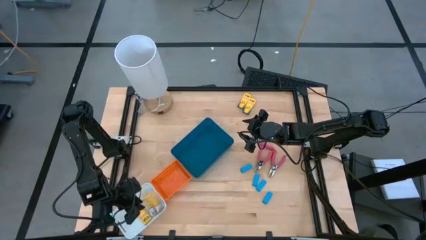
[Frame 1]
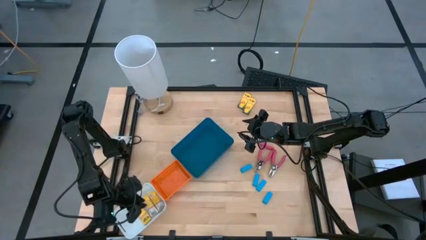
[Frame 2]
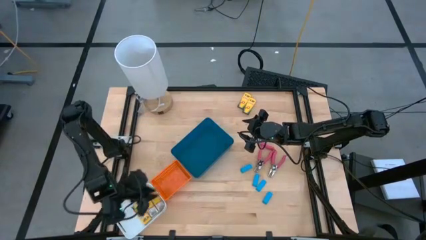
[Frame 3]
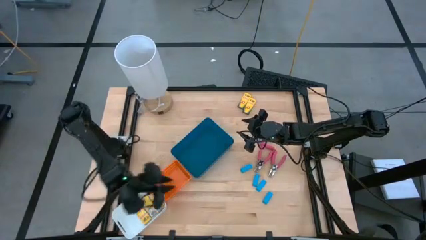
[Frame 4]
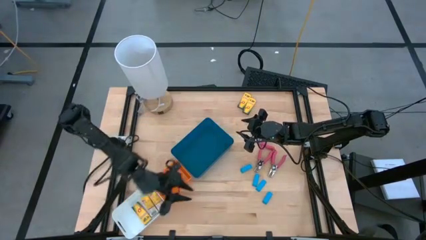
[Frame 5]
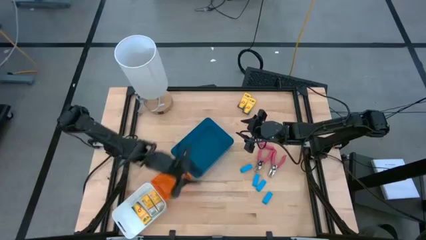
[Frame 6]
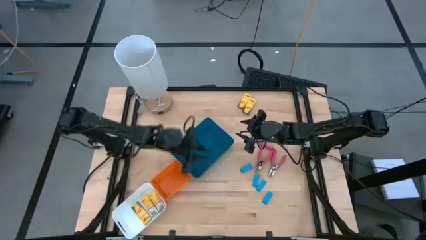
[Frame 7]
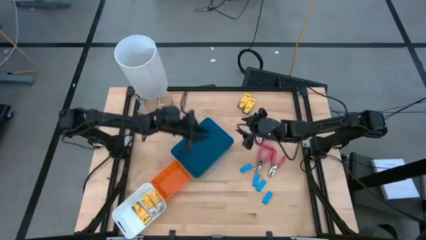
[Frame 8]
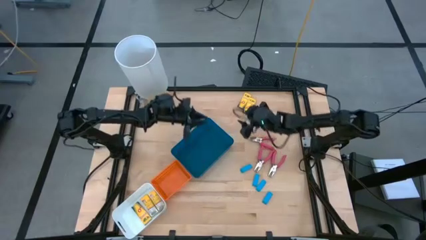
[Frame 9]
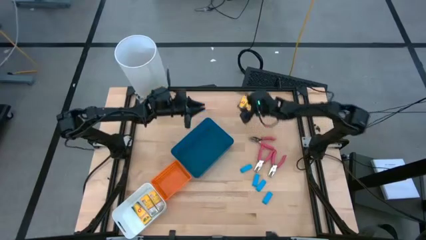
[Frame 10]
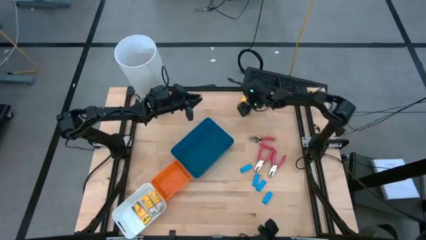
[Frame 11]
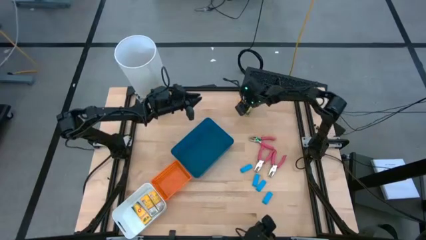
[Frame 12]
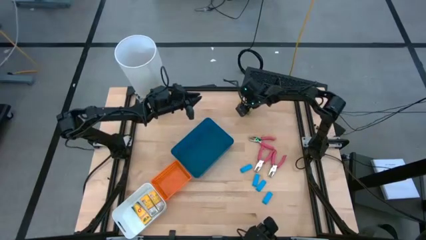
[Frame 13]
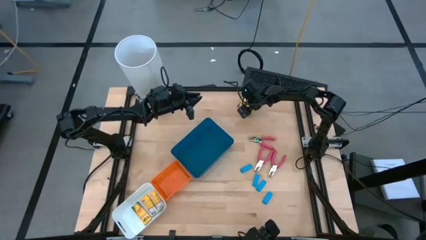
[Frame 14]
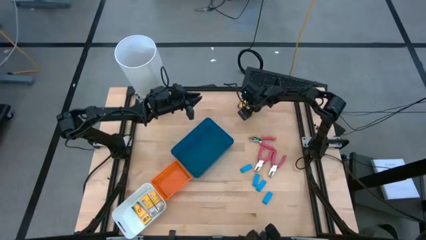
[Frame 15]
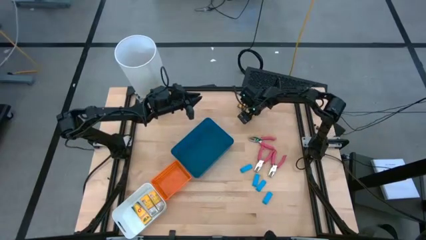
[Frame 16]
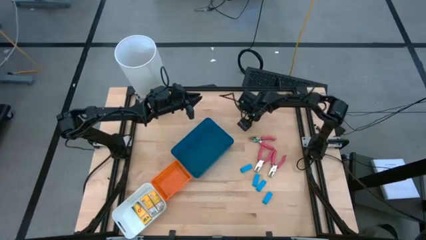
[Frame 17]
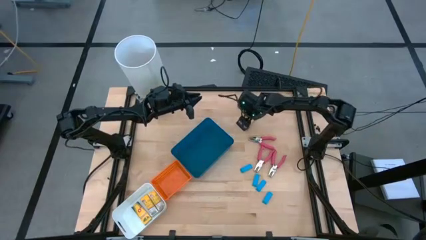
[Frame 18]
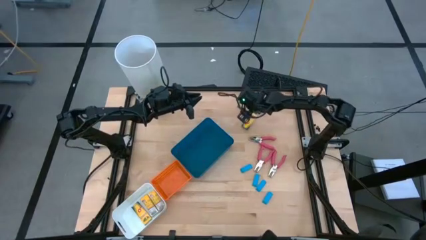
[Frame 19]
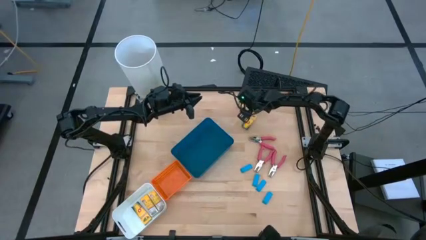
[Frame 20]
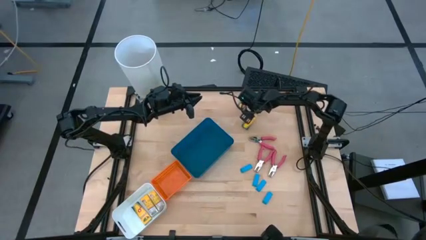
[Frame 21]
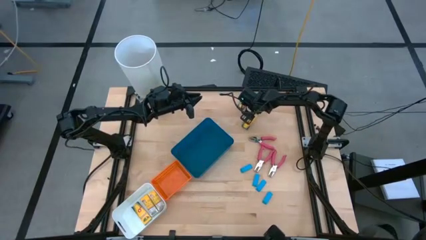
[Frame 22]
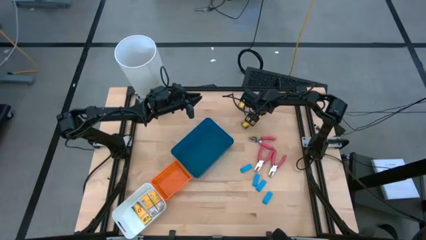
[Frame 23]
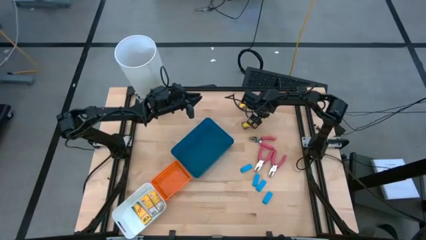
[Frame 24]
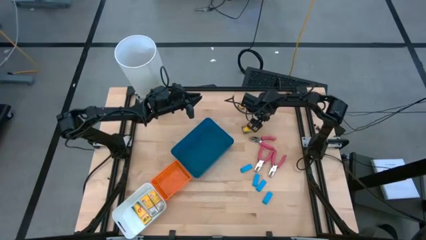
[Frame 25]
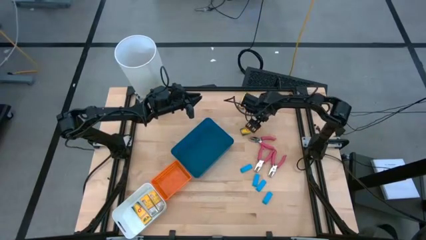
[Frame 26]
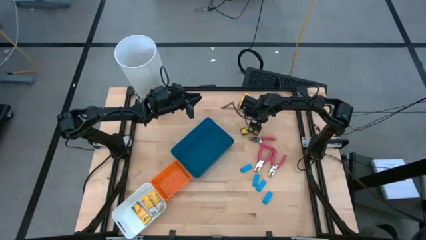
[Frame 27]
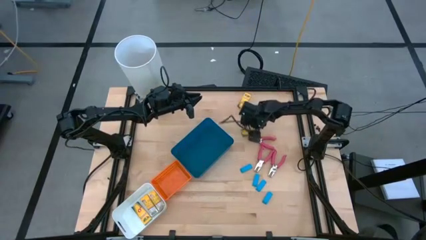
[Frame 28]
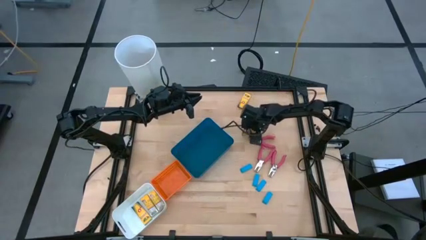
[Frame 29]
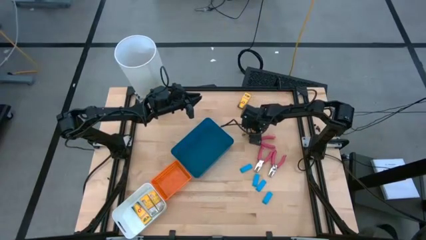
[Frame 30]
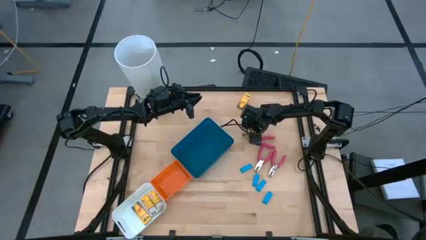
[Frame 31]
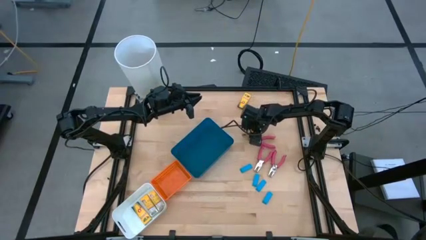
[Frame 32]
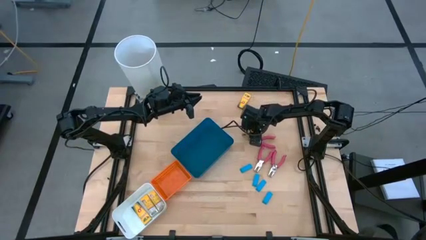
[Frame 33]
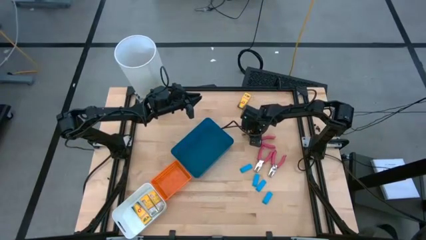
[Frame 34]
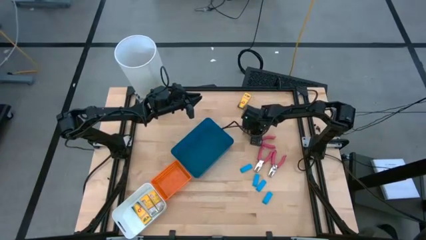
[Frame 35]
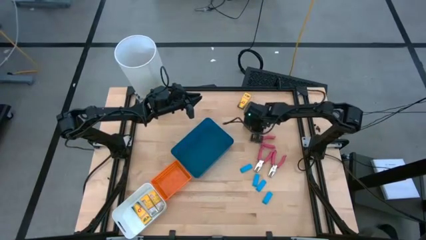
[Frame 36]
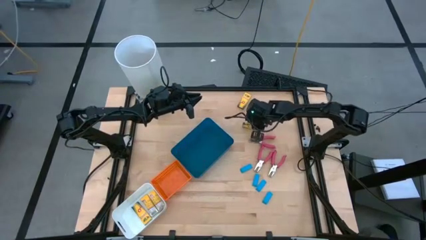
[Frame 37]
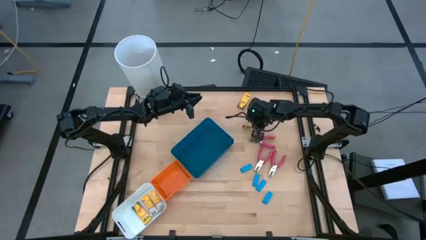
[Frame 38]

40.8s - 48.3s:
Task: Pick & Place School Supplies
Put the yellow crayon box into the white bin

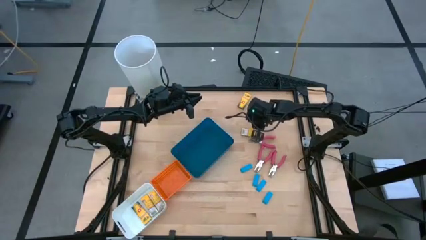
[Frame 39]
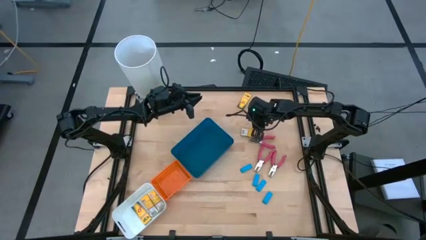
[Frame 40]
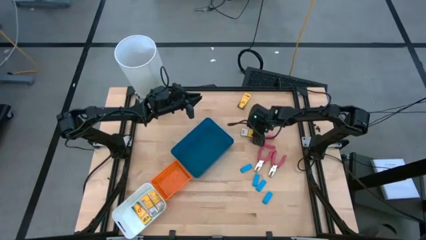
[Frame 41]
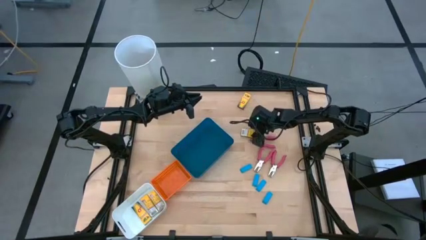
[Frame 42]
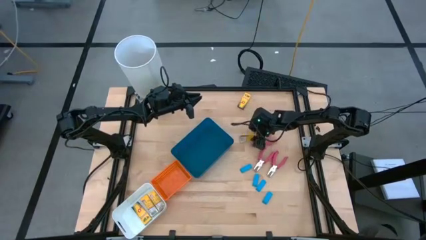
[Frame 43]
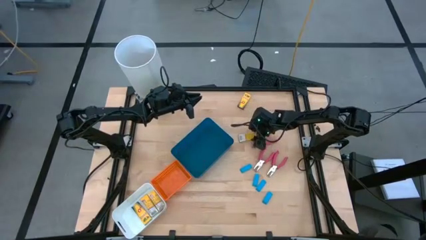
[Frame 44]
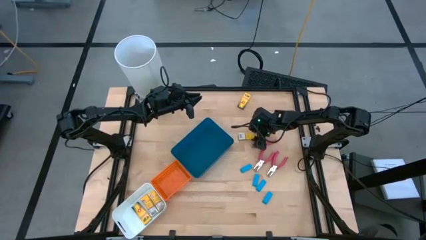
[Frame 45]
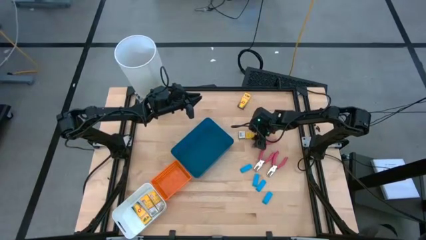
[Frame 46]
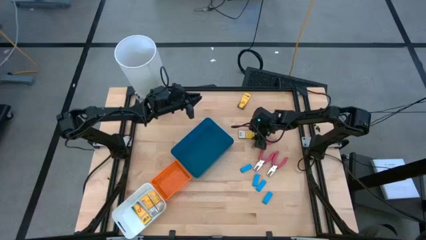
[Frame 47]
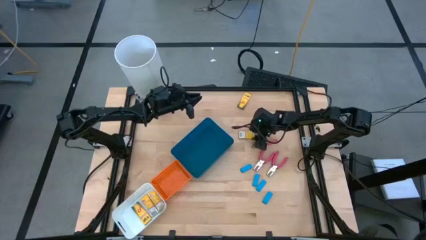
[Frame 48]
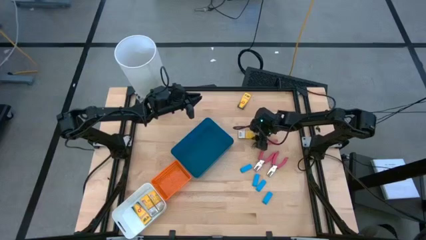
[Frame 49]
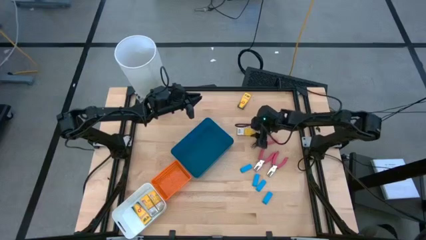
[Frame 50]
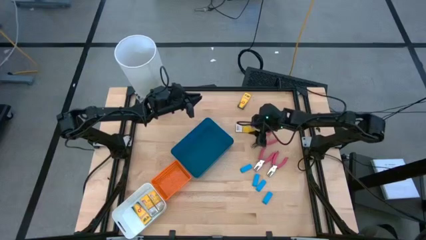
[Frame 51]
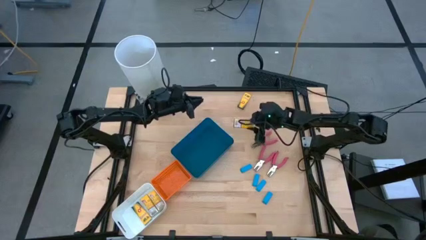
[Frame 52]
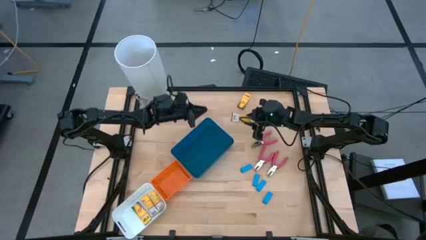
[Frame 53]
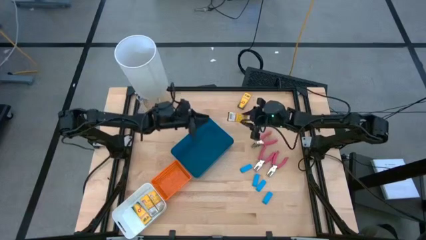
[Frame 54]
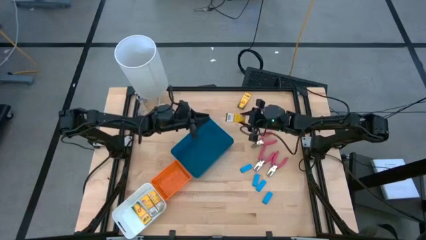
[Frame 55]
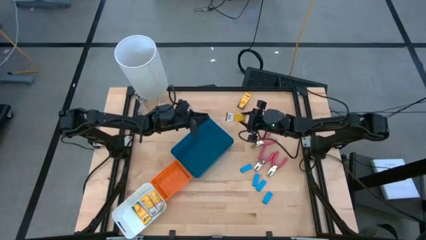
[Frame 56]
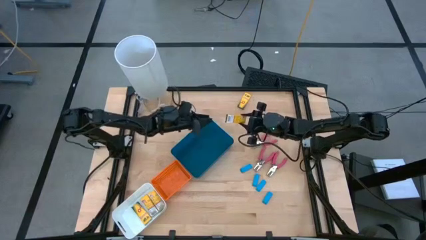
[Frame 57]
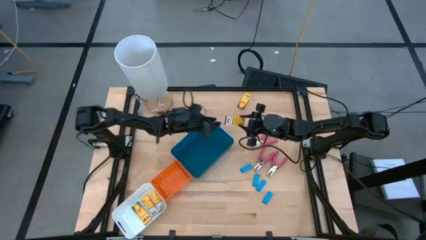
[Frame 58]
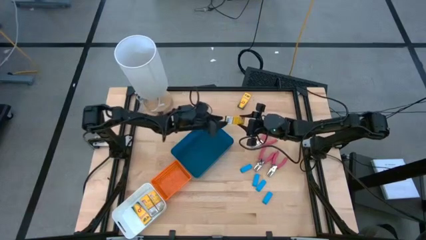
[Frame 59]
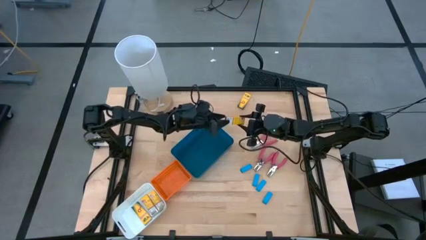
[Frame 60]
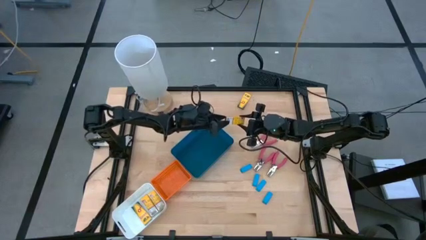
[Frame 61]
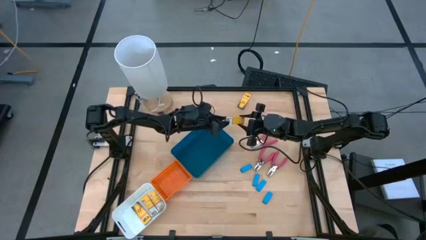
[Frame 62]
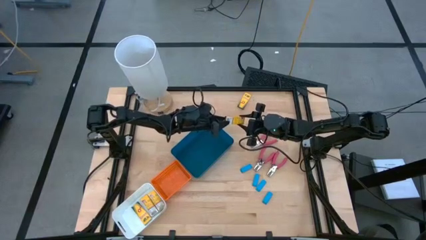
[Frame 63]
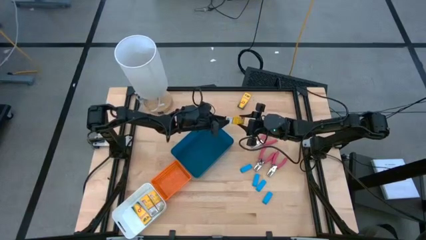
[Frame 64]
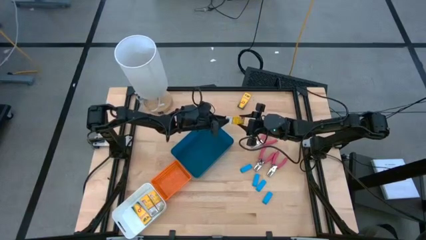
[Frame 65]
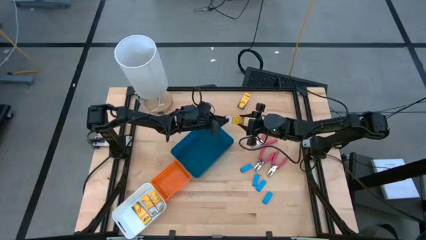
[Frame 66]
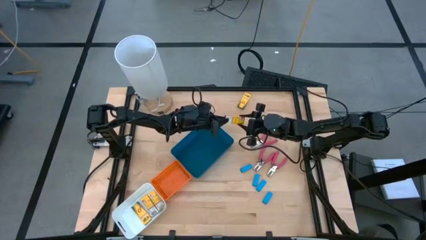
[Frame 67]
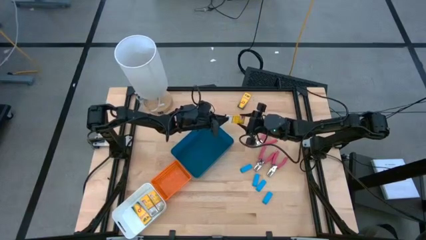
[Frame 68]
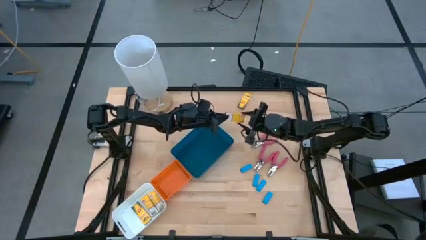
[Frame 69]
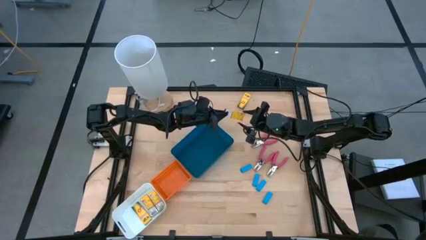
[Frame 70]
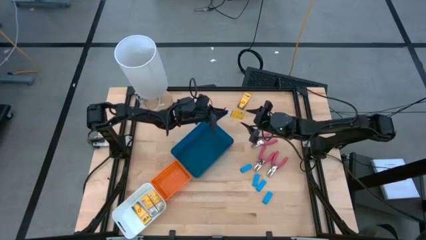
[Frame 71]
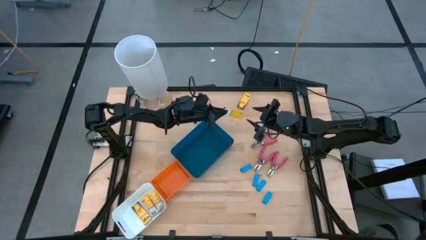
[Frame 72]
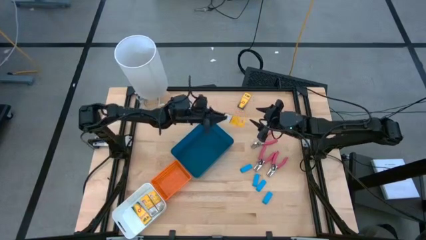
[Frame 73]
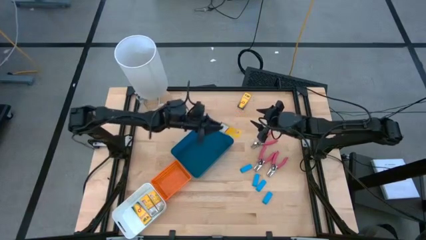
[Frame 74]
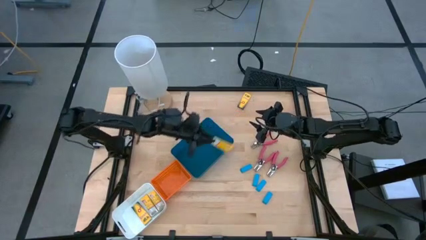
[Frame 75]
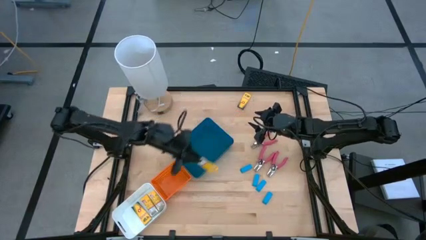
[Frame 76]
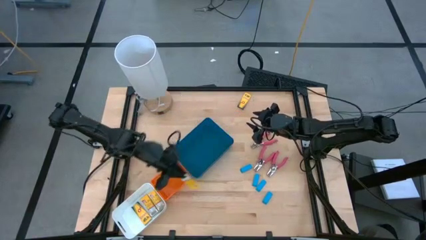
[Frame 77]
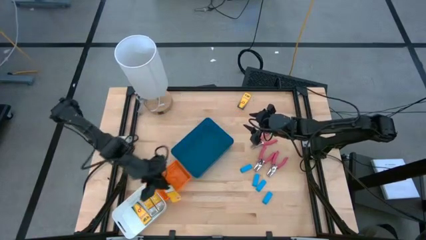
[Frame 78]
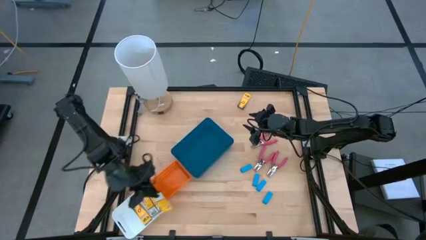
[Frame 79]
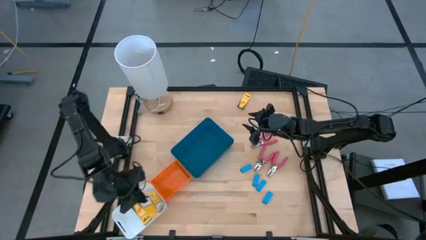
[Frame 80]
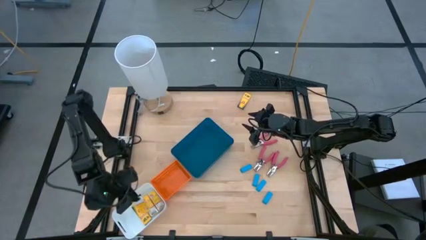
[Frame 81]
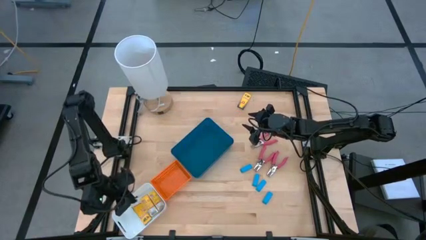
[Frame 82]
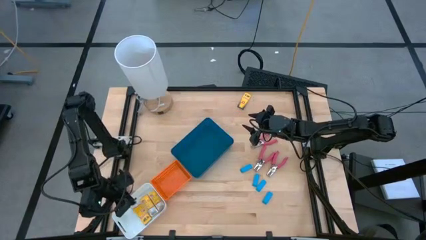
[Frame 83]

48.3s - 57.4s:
Put the yellow crayon box into the white bin
